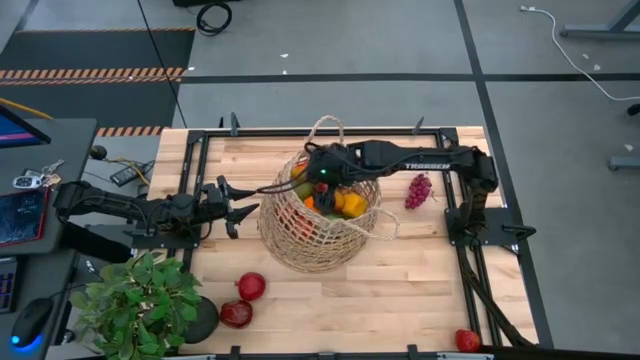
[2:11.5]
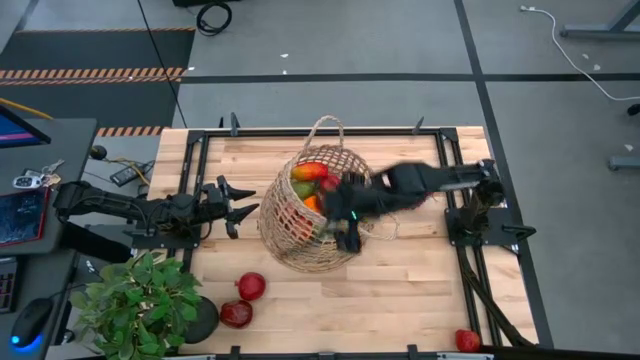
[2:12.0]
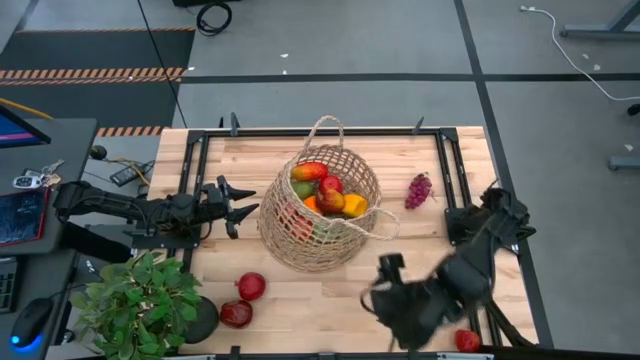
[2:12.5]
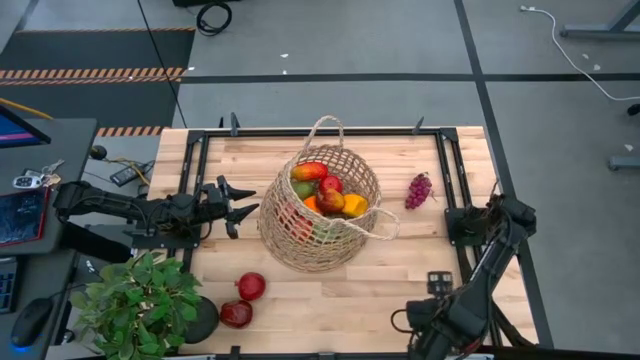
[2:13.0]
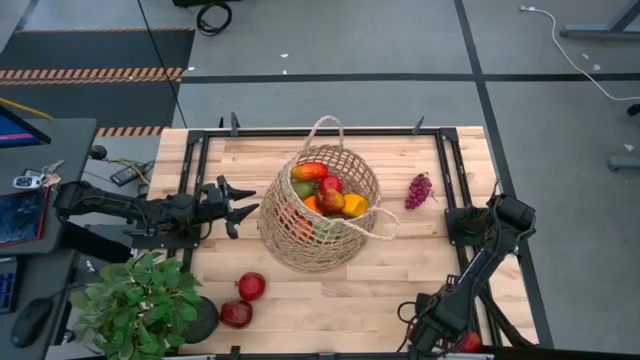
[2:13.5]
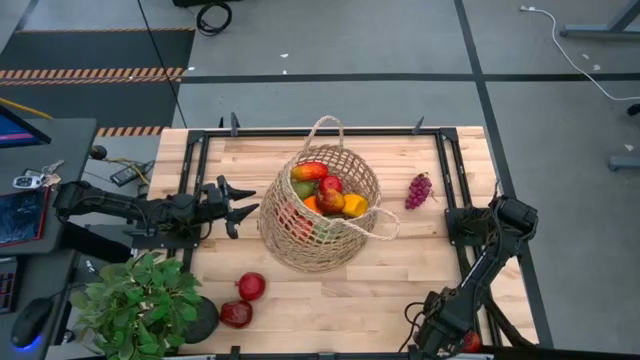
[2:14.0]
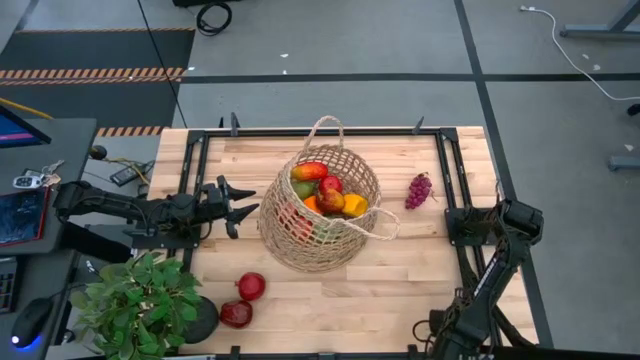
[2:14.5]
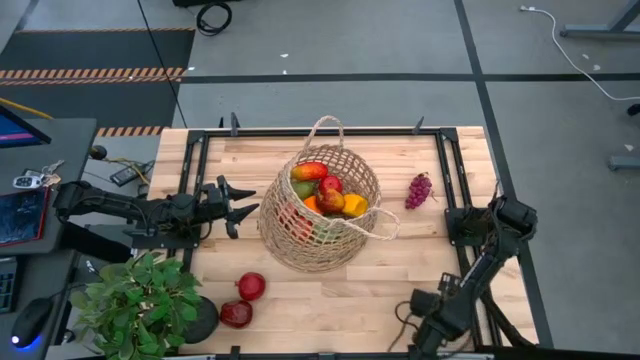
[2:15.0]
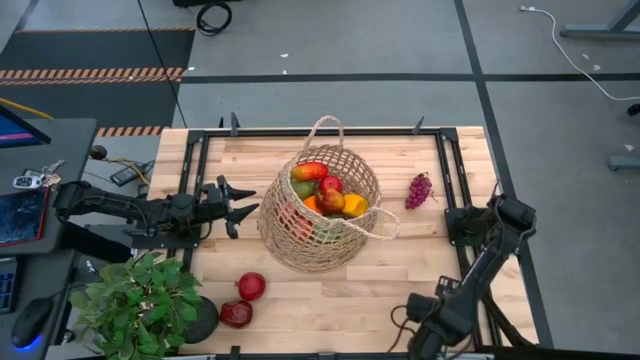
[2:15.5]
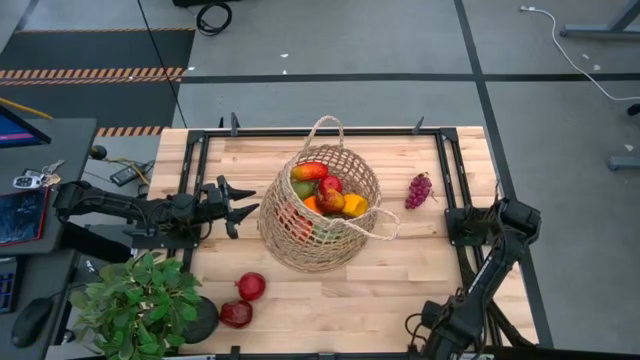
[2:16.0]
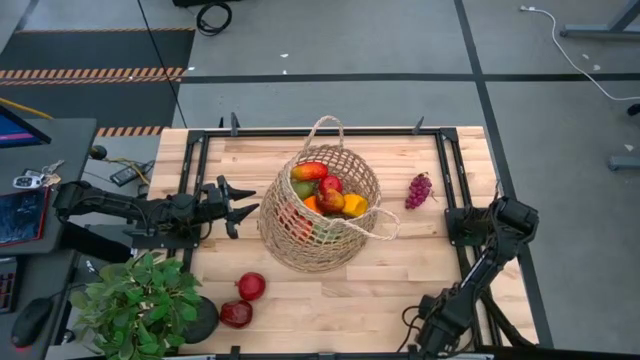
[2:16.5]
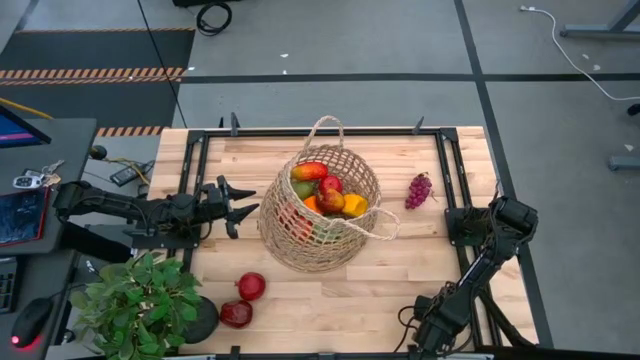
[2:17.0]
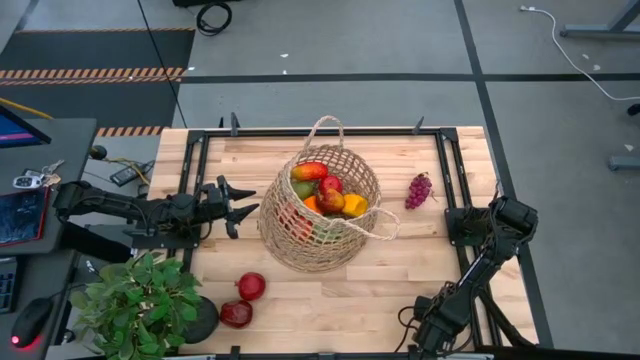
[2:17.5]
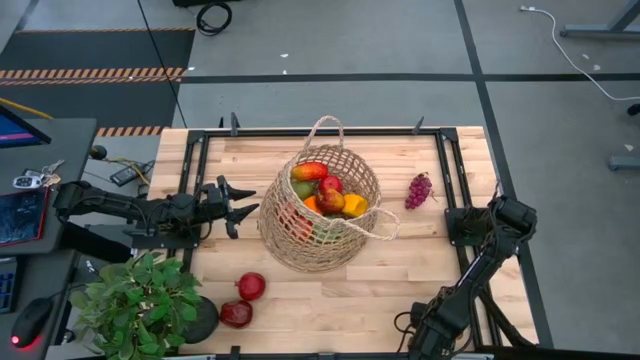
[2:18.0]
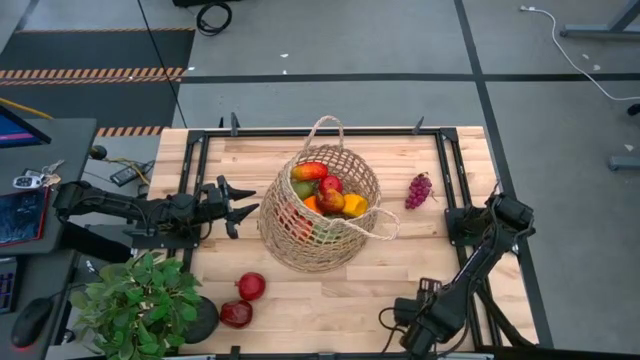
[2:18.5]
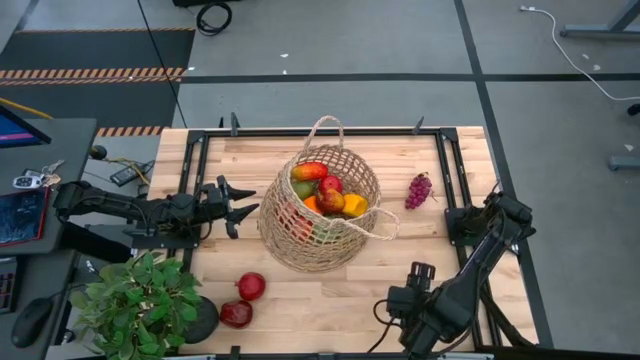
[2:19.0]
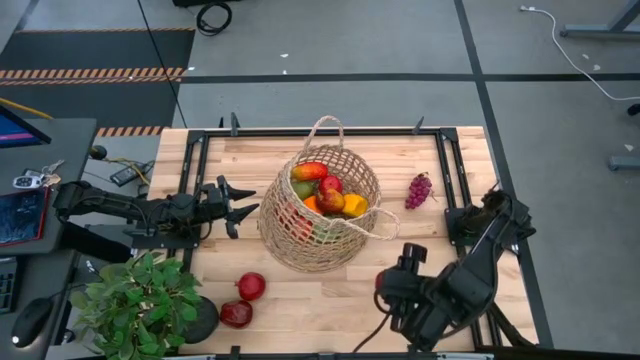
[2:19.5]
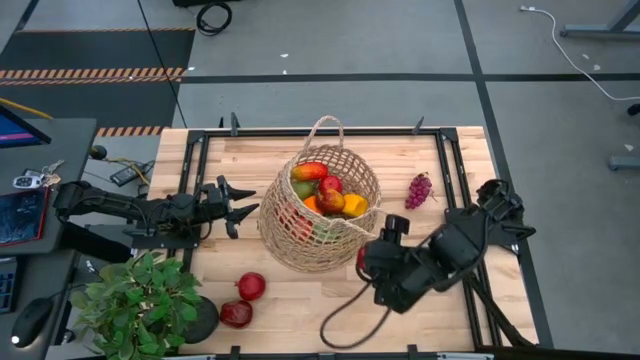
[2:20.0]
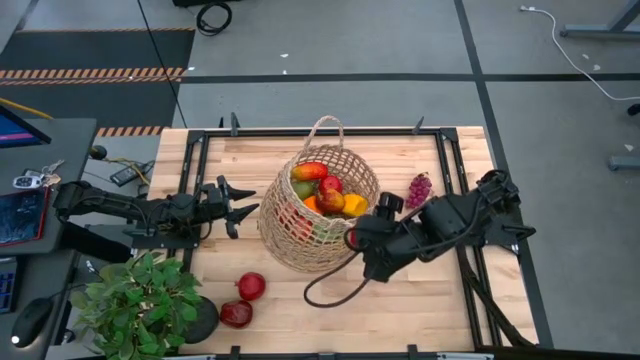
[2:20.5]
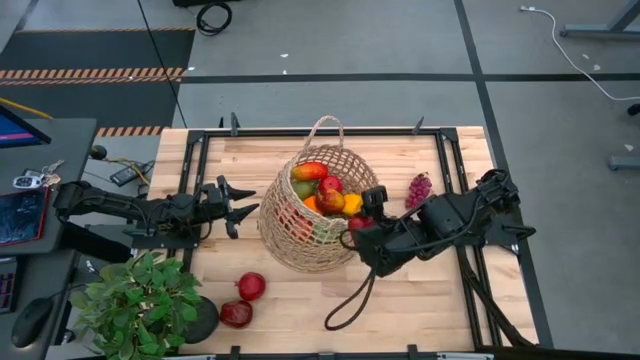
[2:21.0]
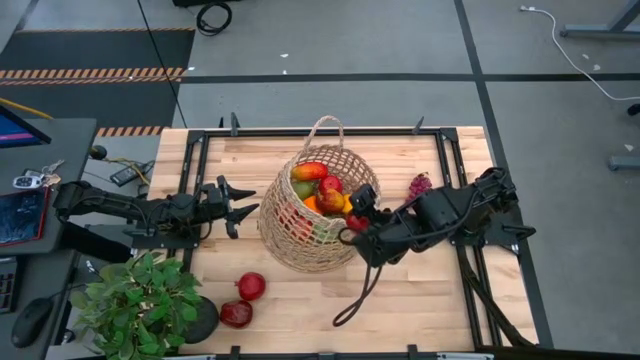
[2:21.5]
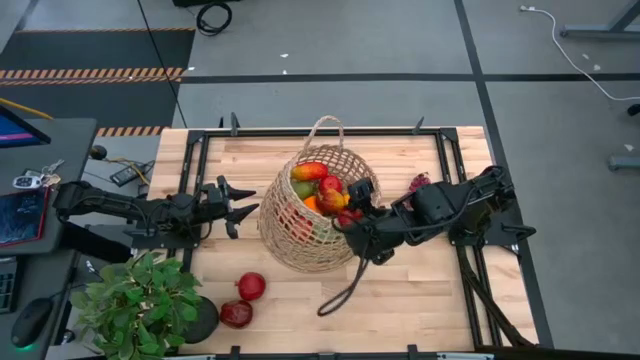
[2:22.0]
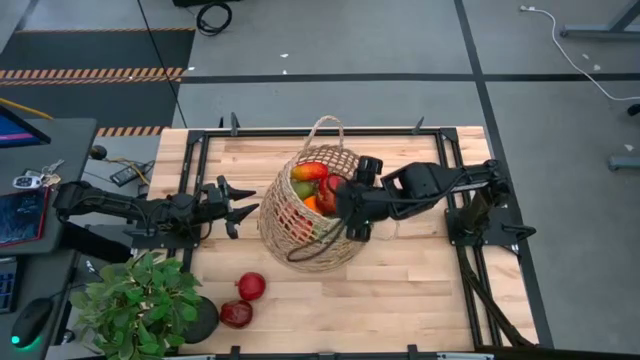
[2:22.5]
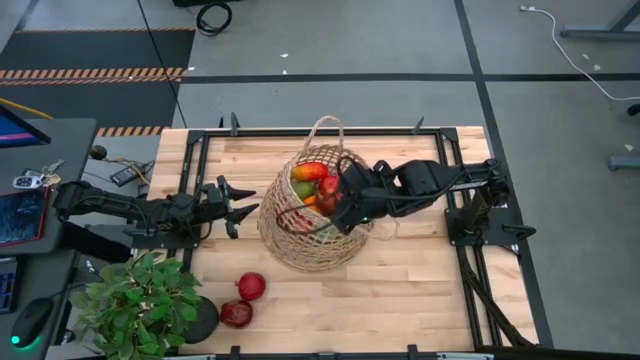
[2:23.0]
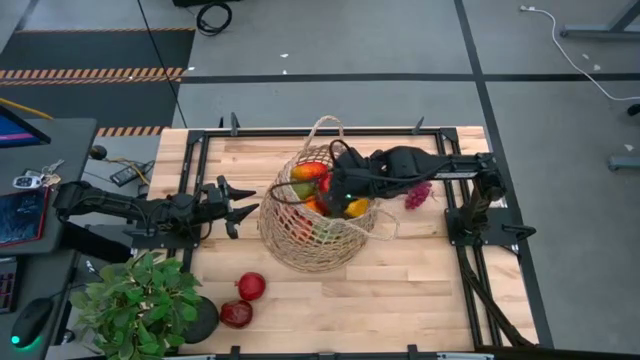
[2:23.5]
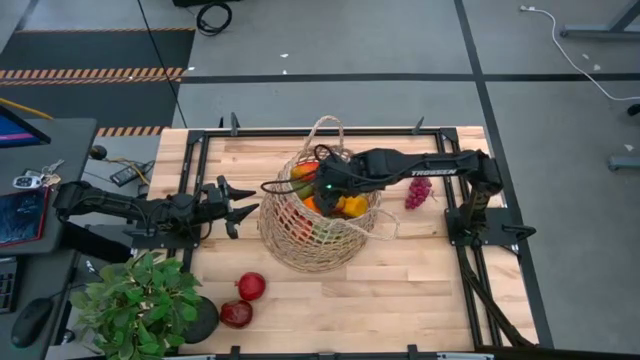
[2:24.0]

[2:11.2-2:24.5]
Task: Build produce basket
Put the red apple into the basket

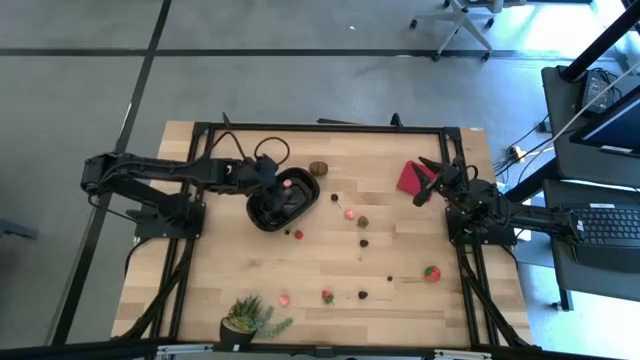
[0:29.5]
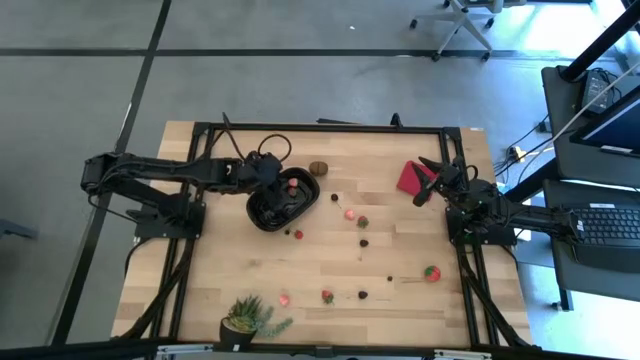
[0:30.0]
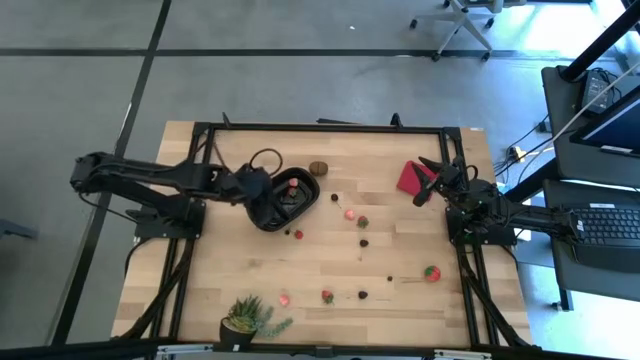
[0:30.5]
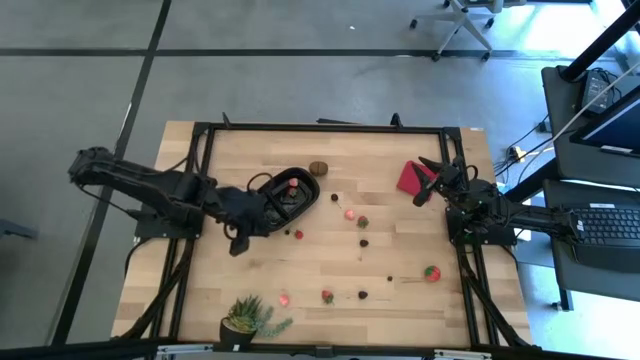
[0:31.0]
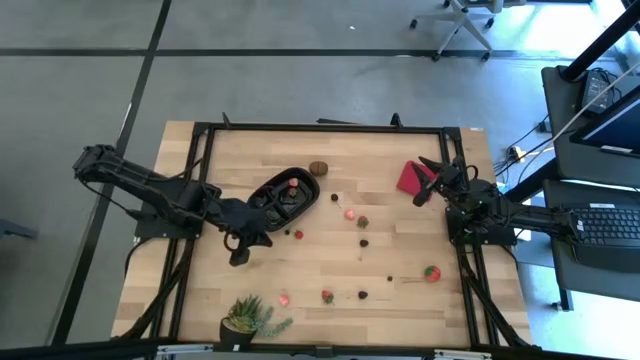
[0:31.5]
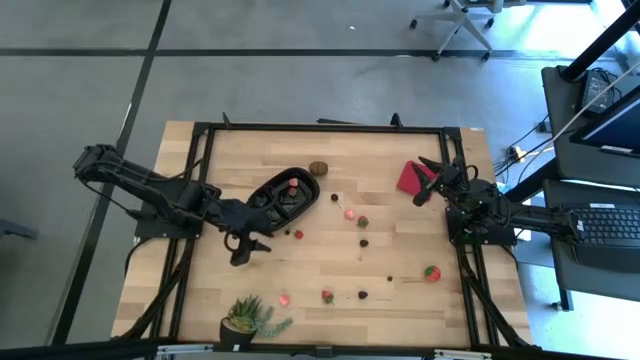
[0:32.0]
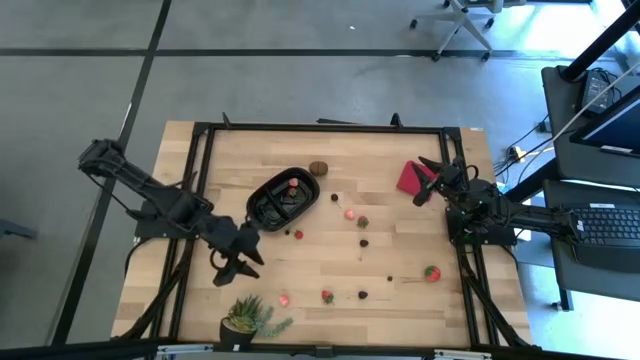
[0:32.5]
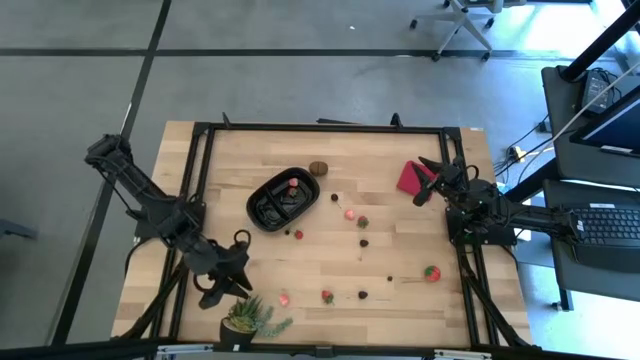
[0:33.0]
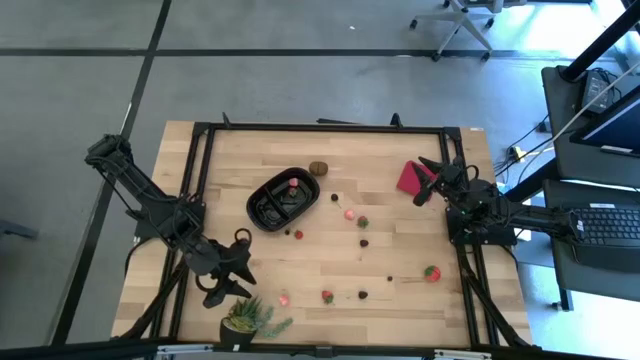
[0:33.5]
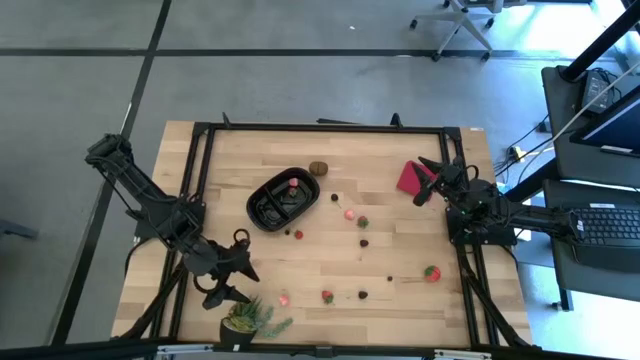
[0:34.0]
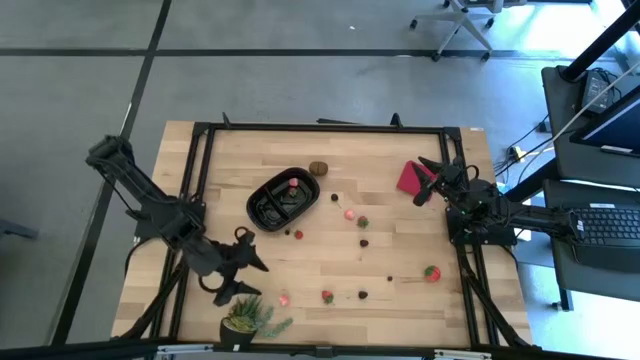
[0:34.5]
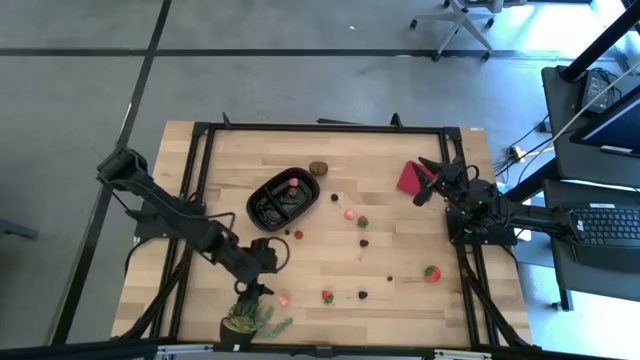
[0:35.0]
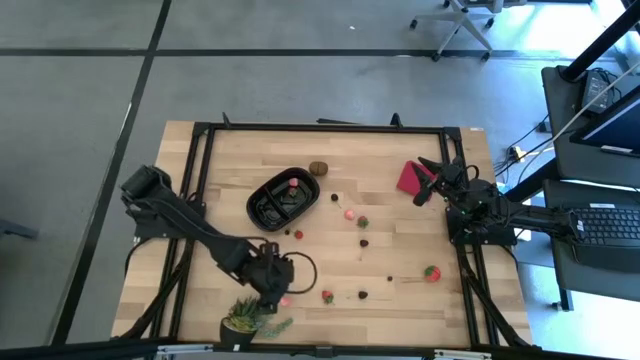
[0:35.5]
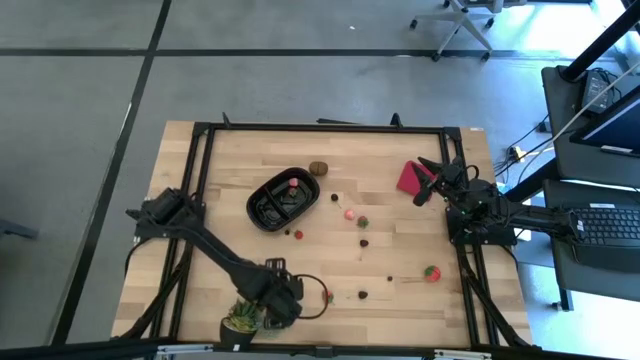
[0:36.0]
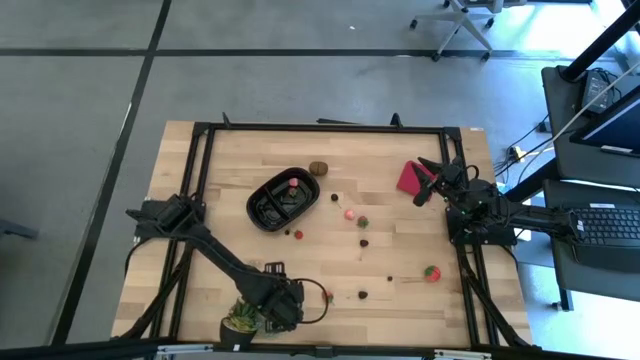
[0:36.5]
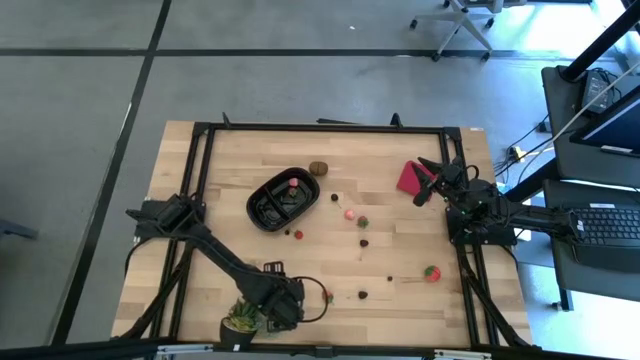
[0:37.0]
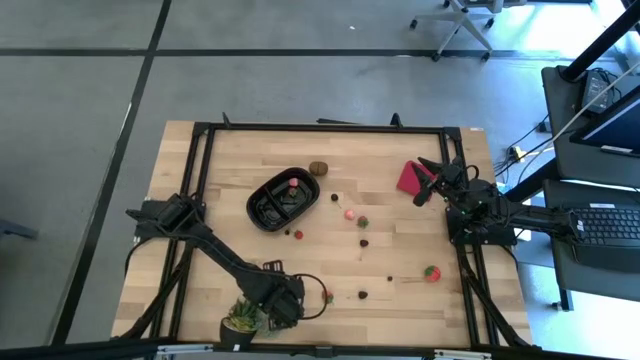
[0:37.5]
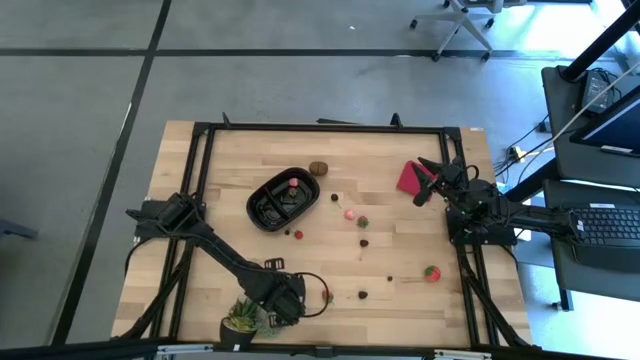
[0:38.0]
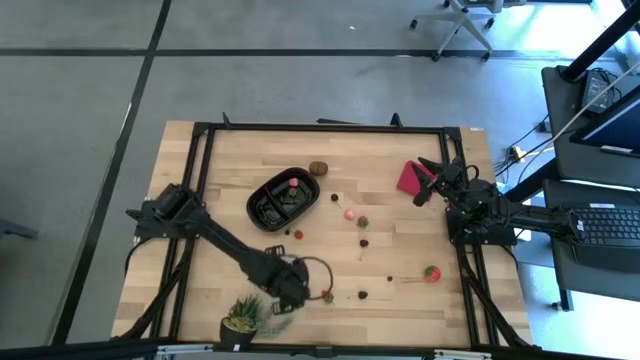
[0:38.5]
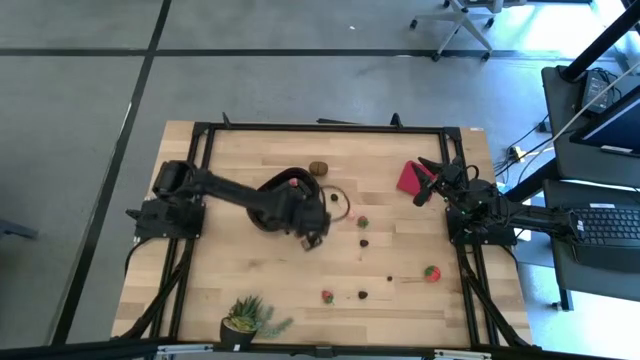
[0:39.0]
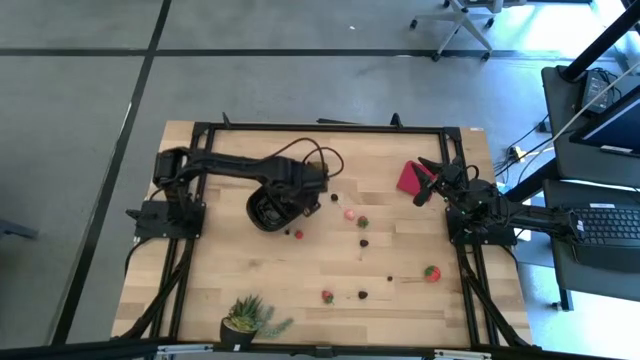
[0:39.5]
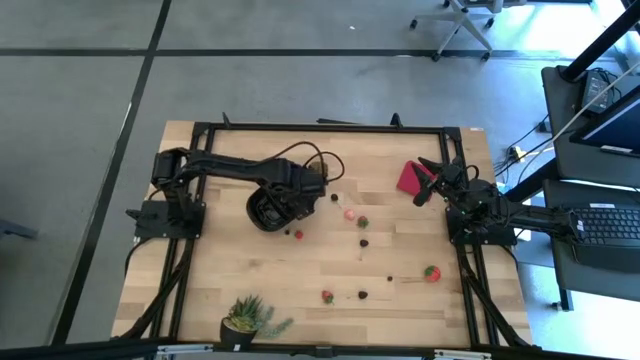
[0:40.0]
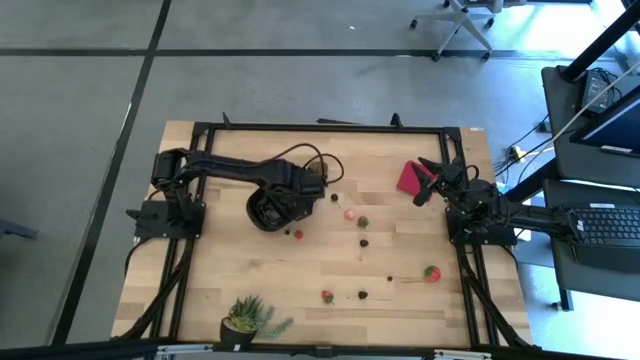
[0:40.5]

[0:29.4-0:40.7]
Task: Pick and placing Produce into tupperware
Put the pink peach into the black bin
